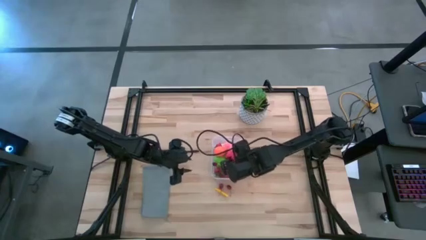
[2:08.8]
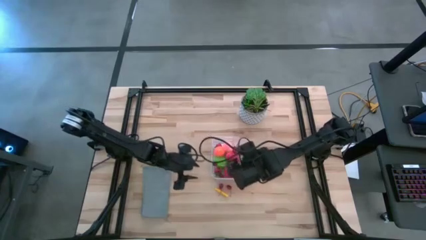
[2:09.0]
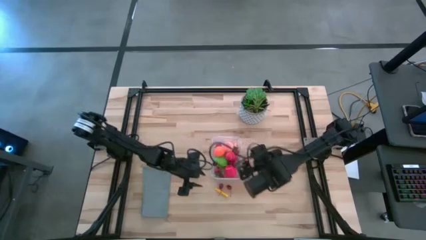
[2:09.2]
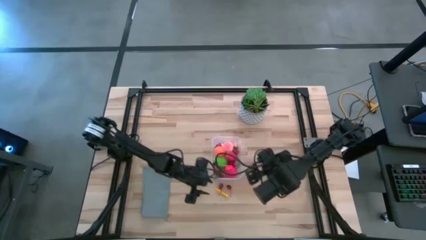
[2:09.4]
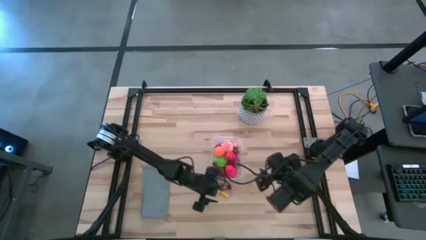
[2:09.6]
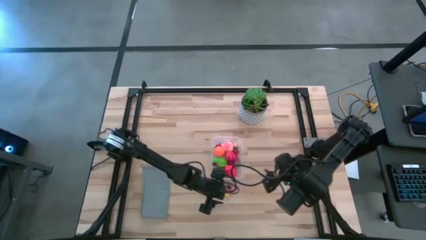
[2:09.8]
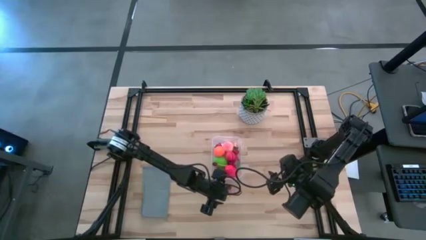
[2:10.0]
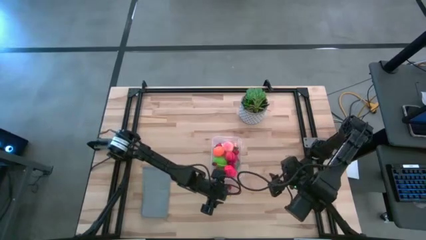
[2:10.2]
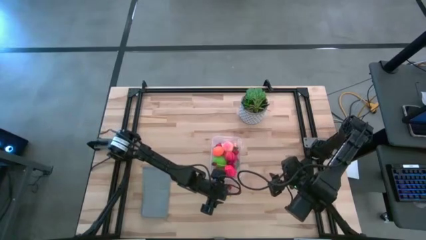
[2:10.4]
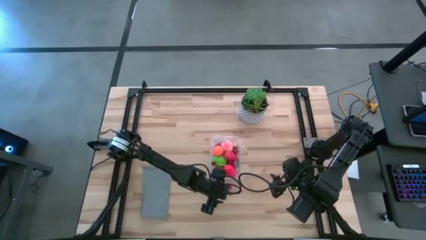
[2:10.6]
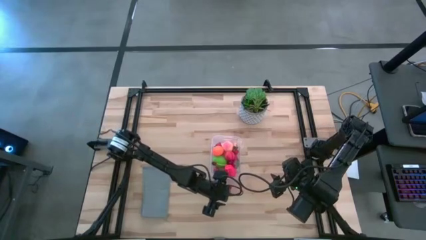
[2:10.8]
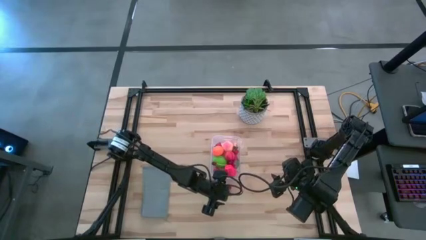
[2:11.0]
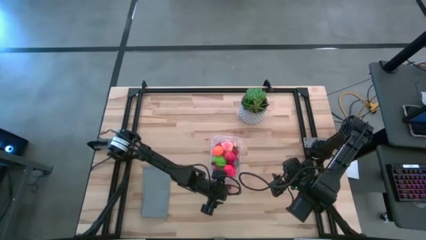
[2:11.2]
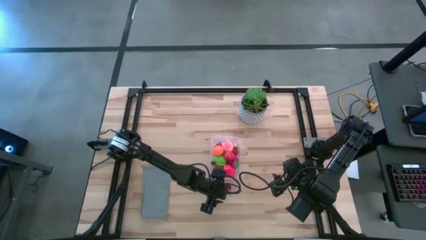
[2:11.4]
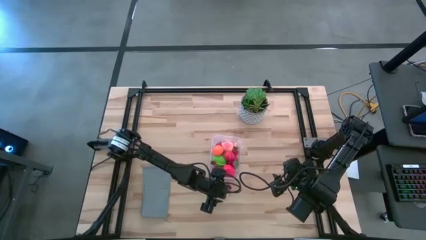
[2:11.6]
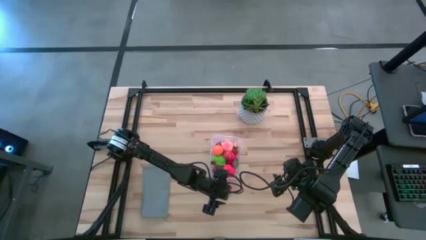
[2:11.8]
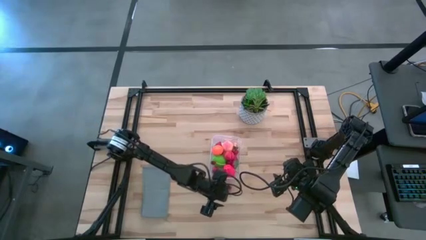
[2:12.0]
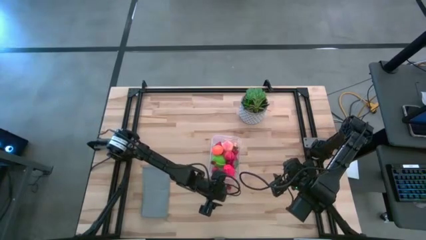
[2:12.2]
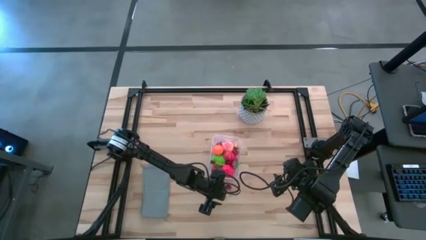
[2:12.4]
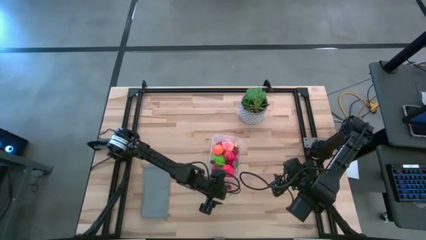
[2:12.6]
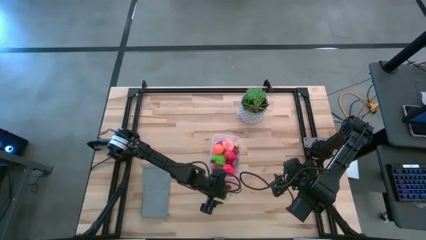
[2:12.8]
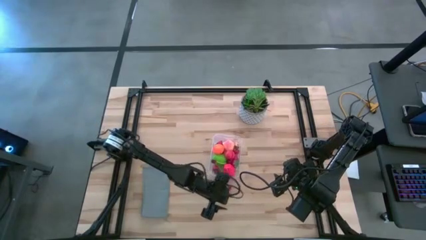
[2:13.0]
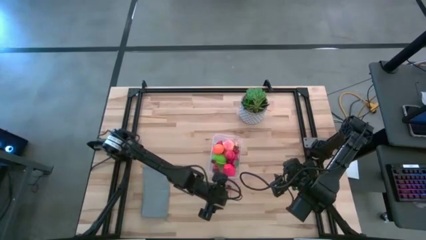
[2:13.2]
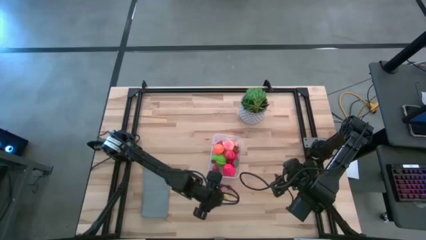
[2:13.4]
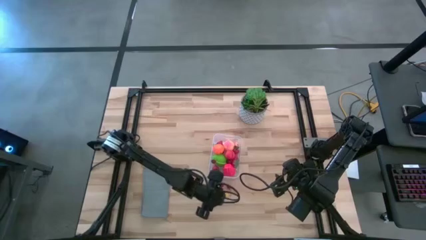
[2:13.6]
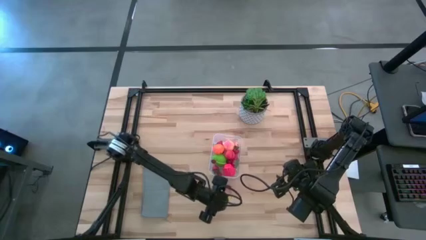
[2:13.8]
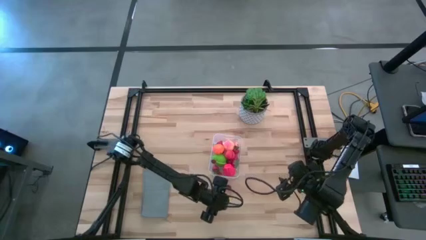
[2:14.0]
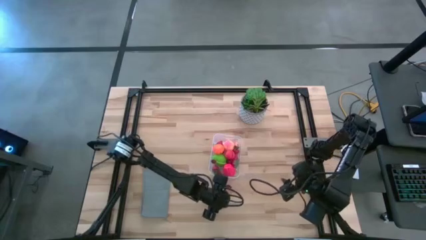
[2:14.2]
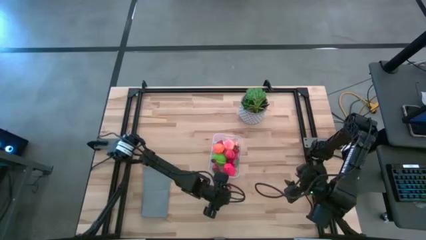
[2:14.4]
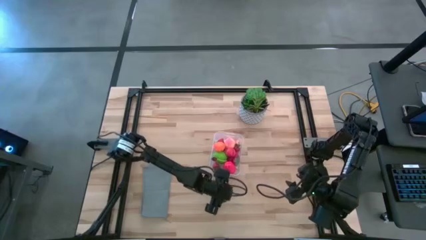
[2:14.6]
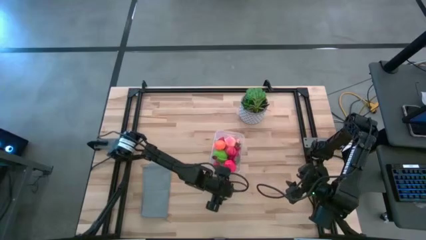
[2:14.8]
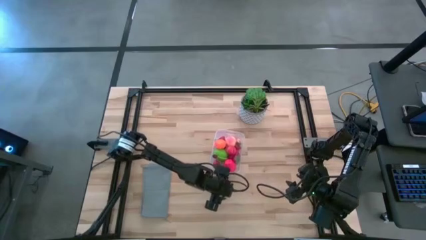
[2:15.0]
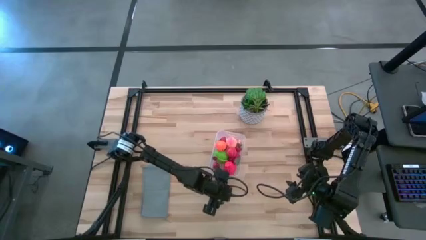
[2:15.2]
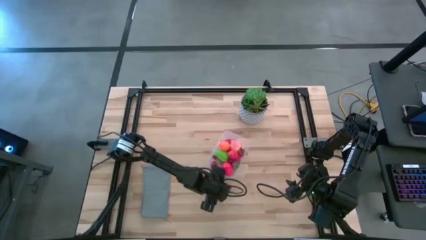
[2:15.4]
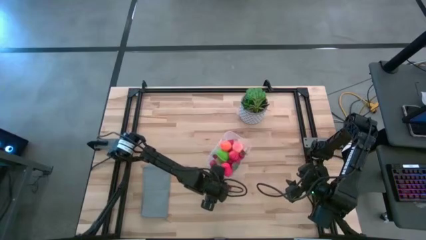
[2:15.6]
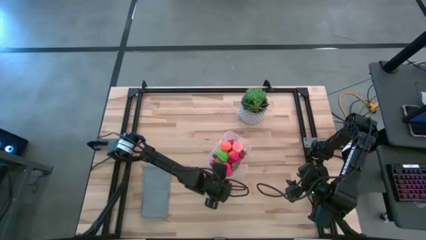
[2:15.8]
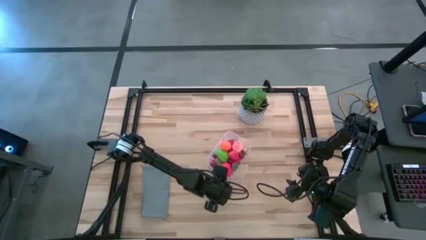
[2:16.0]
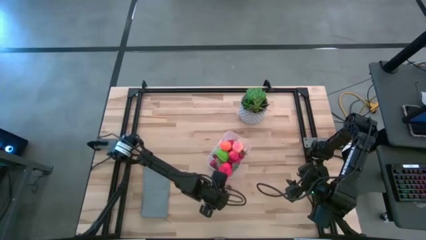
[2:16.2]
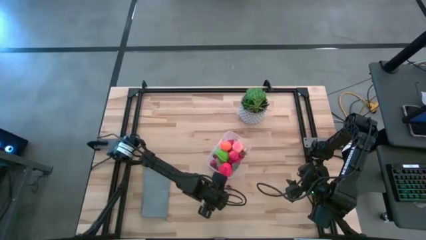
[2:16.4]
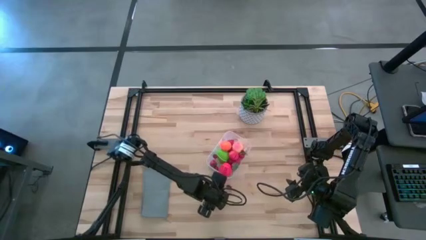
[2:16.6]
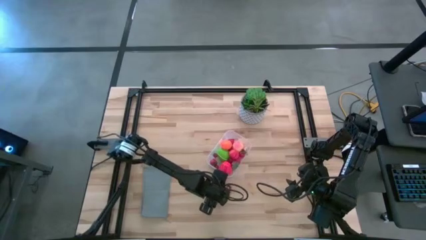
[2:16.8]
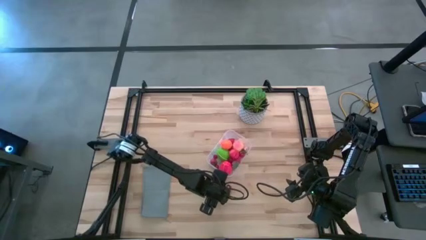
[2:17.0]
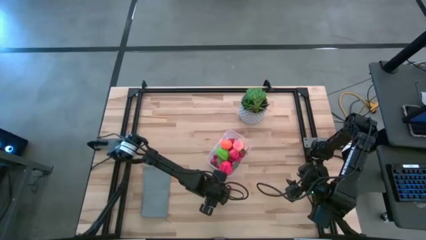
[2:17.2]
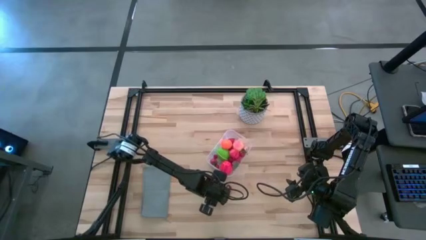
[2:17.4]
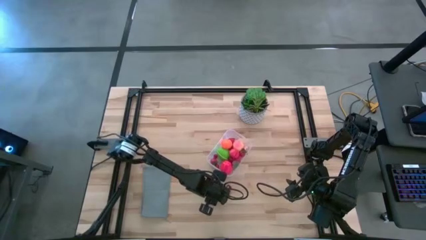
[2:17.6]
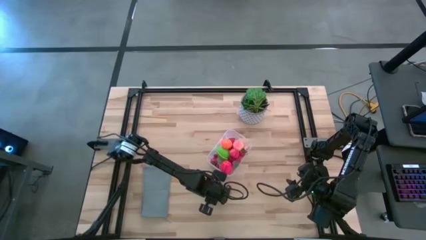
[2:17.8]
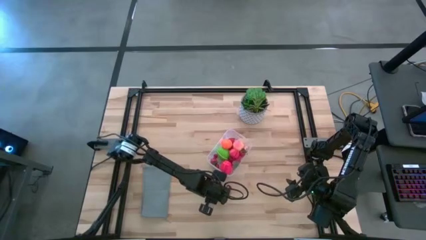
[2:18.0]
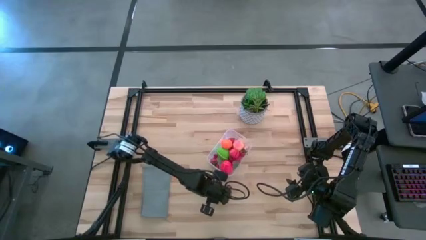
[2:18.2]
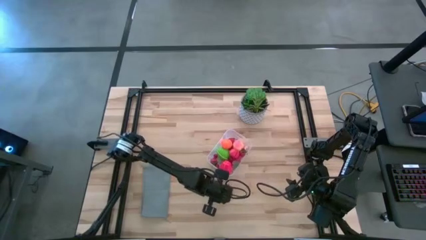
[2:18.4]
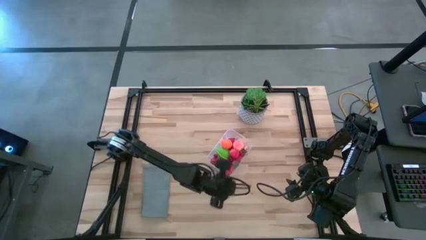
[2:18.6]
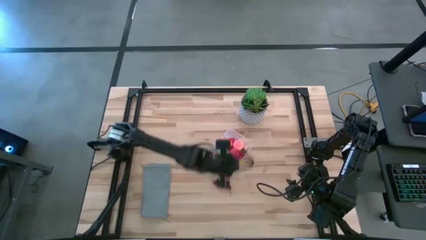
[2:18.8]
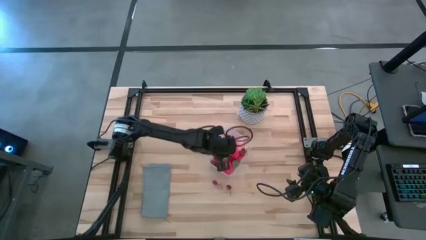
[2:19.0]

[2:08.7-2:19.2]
Task: Pick and placing Produce into tupperware
Put the yellow corn into the transparent bin

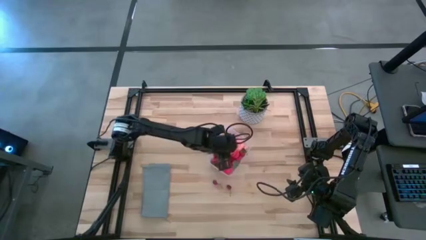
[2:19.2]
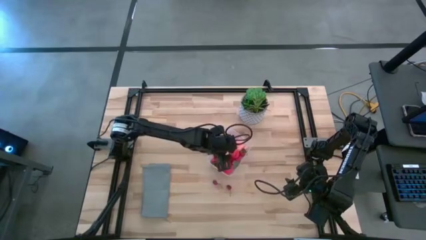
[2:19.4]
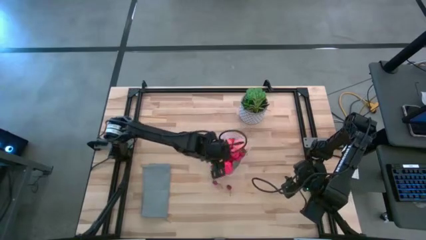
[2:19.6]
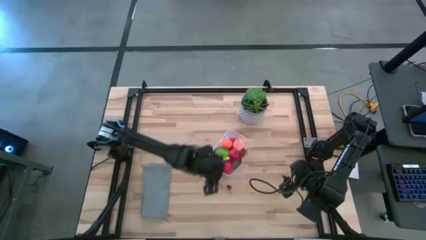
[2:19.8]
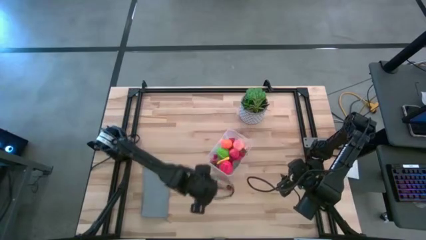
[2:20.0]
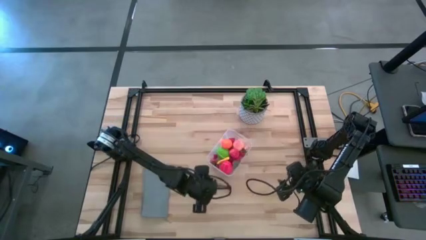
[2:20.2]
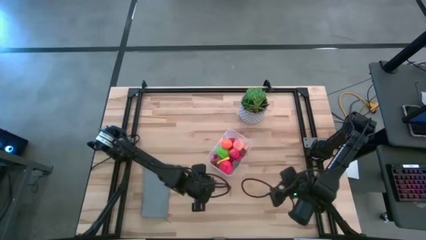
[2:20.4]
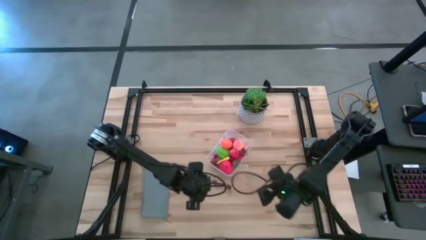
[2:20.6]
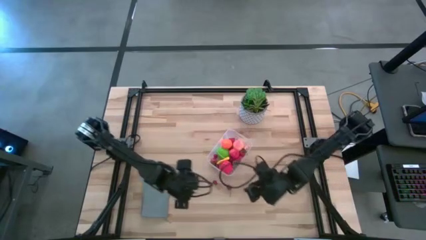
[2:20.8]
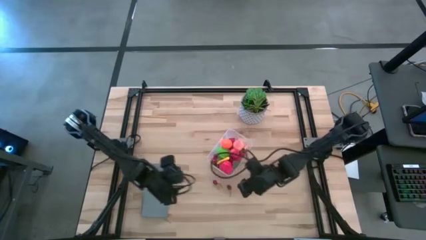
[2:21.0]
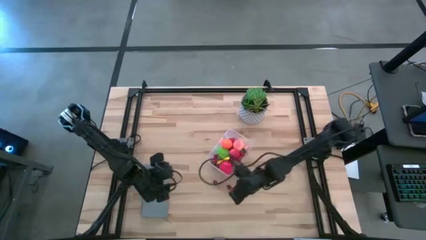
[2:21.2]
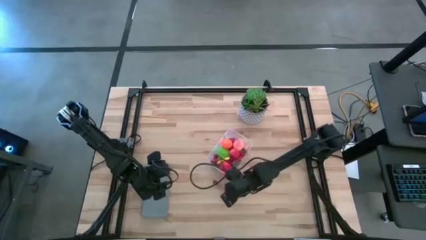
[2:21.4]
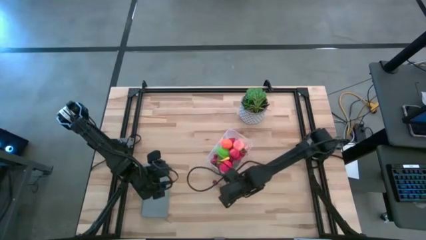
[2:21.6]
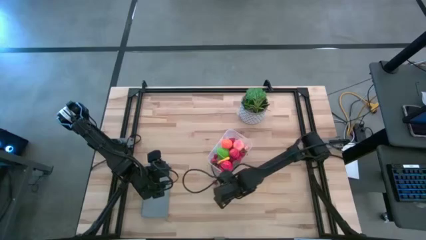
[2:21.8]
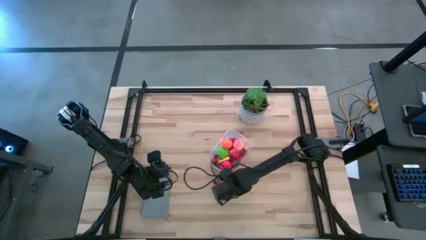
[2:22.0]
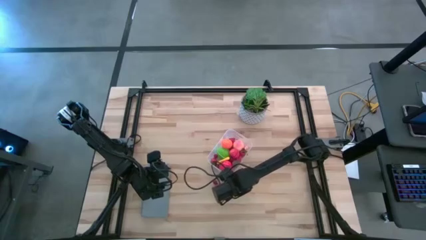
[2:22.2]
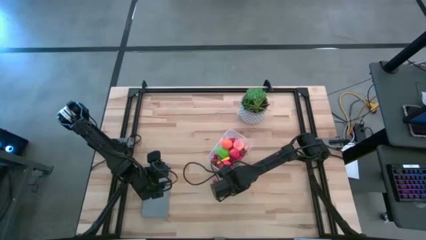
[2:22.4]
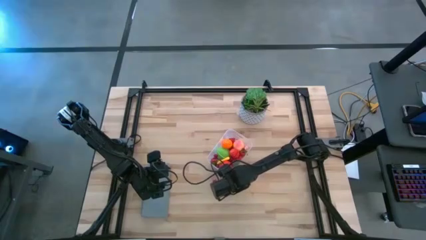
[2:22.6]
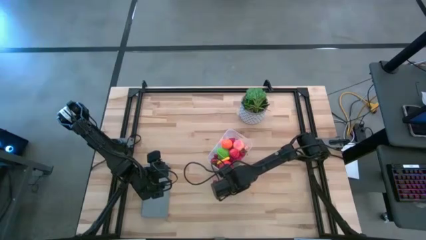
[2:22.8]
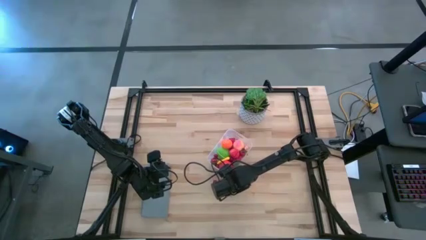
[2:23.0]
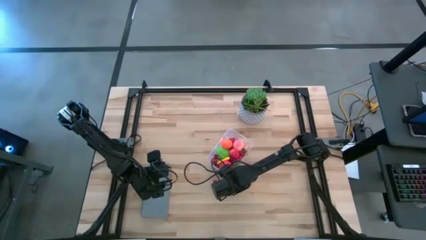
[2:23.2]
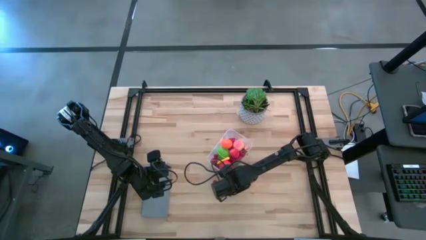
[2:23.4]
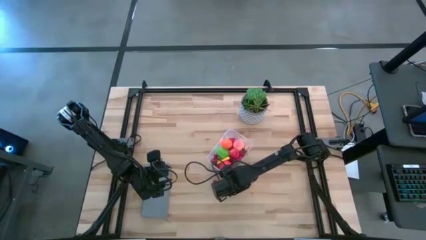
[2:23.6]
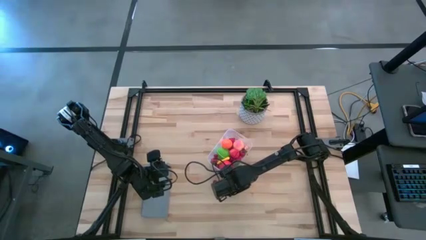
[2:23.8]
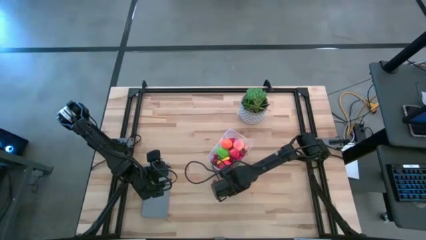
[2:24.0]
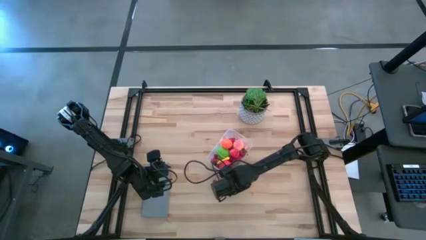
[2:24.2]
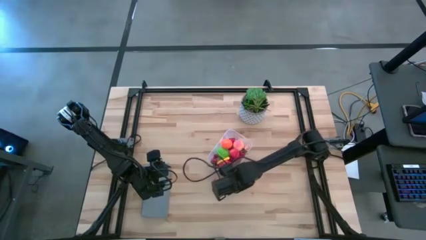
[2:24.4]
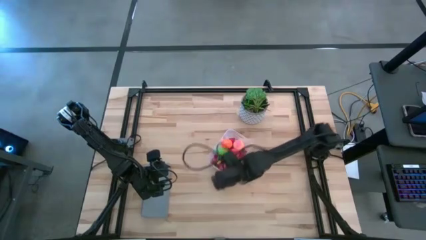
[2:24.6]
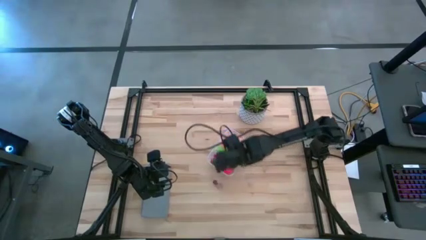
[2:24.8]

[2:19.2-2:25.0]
Put the red cherry into the transparent bin
